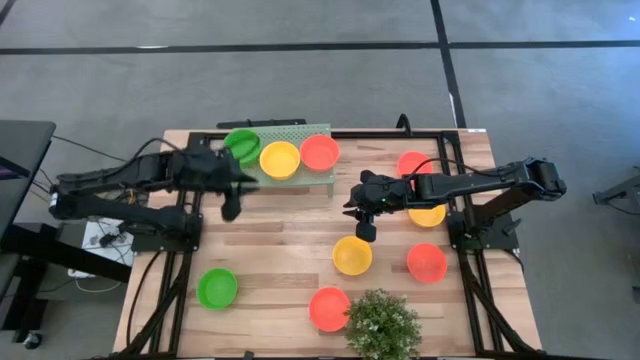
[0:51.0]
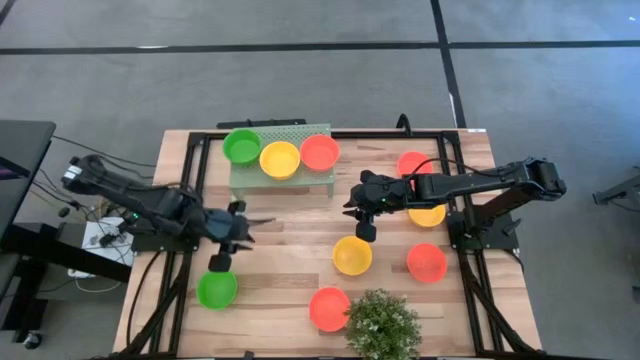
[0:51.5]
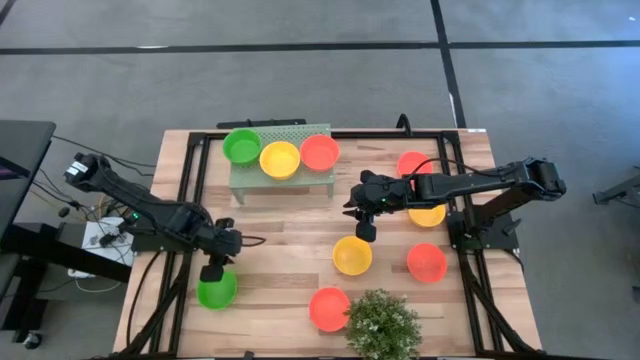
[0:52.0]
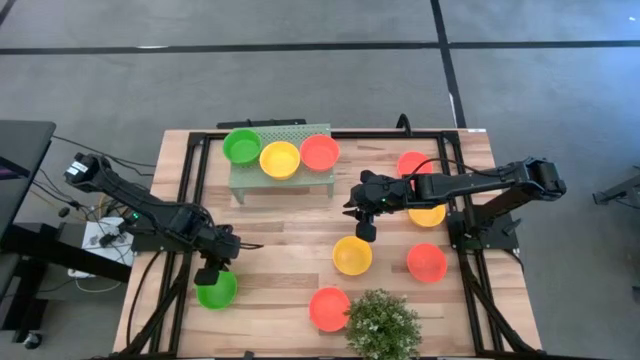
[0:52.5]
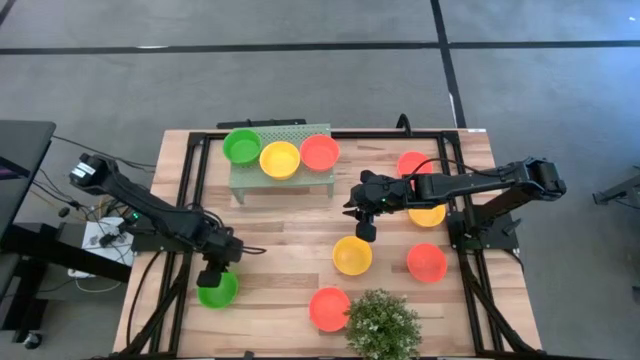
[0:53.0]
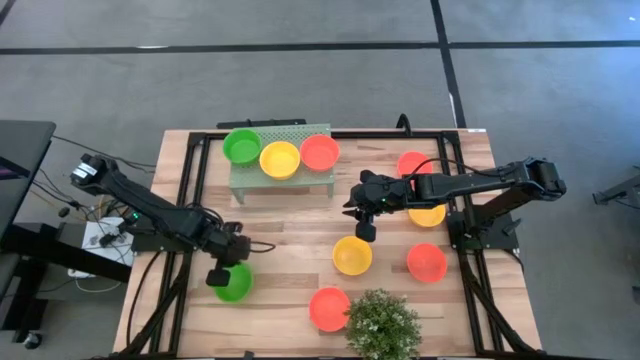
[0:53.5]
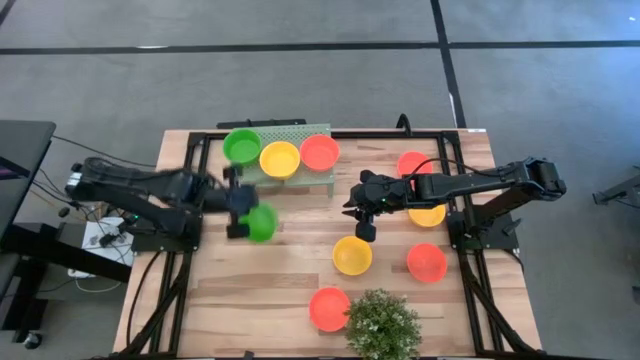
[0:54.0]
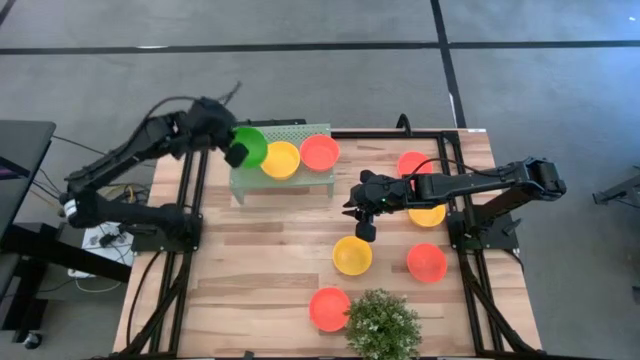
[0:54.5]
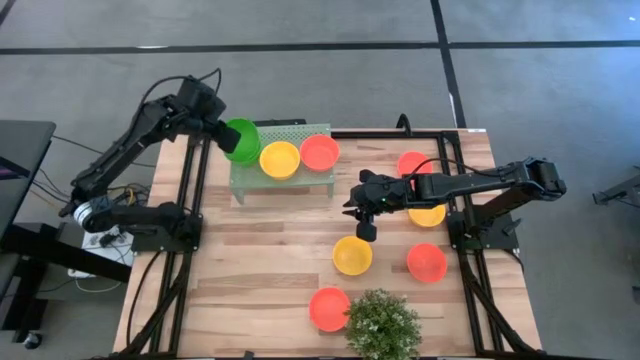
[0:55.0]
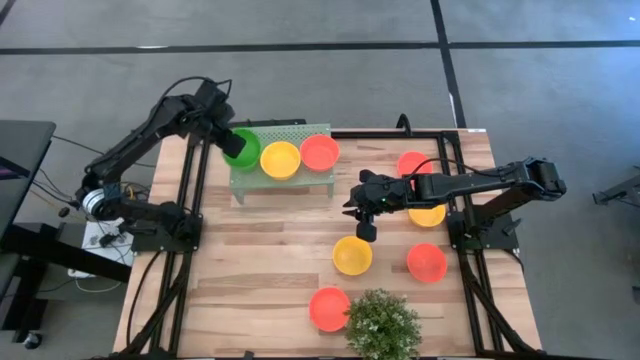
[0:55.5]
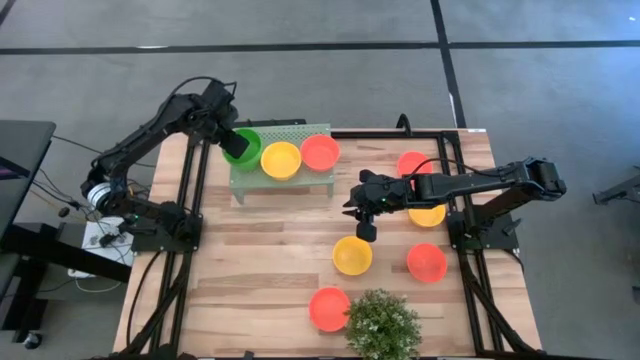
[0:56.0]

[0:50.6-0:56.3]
Task: Pick & Place Mini bowls
Stack the green bowl on top of the green bowls on the shelf

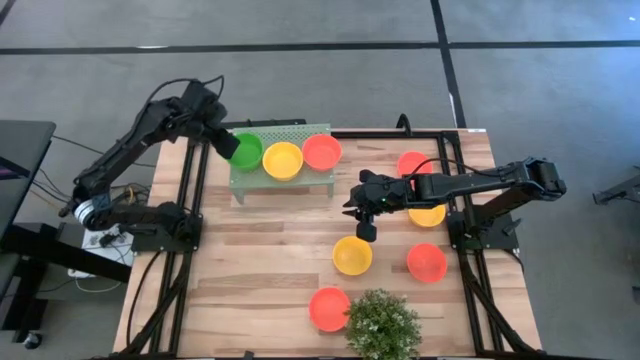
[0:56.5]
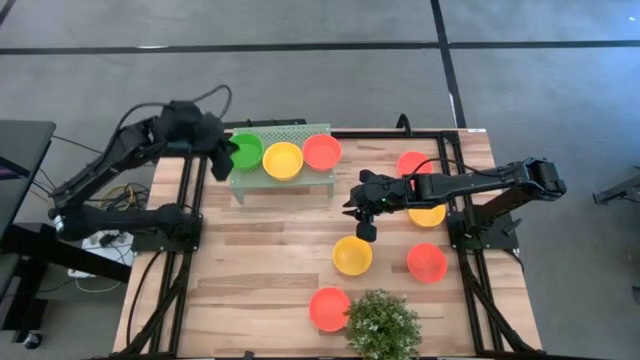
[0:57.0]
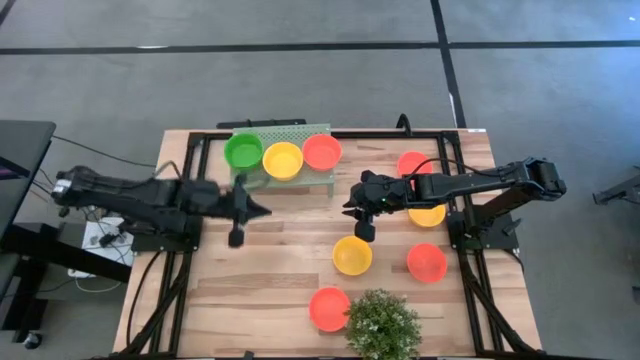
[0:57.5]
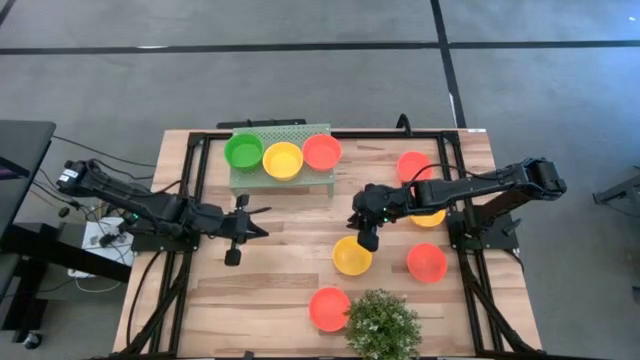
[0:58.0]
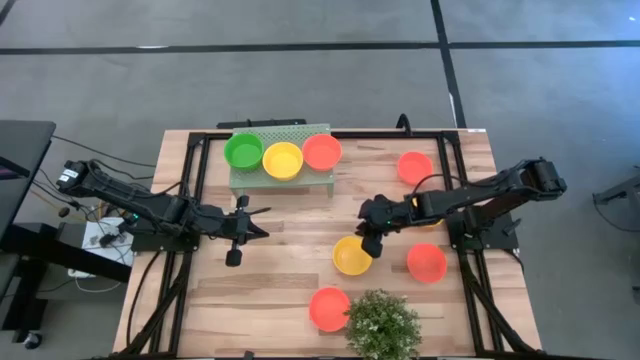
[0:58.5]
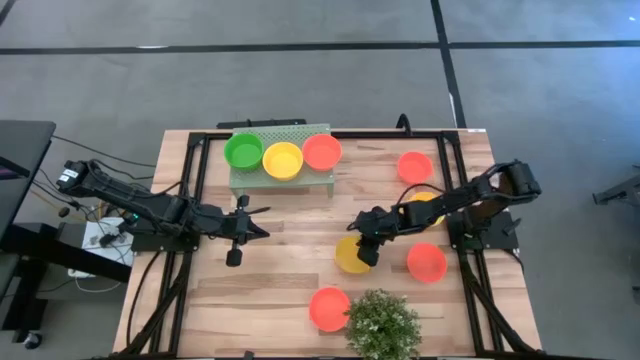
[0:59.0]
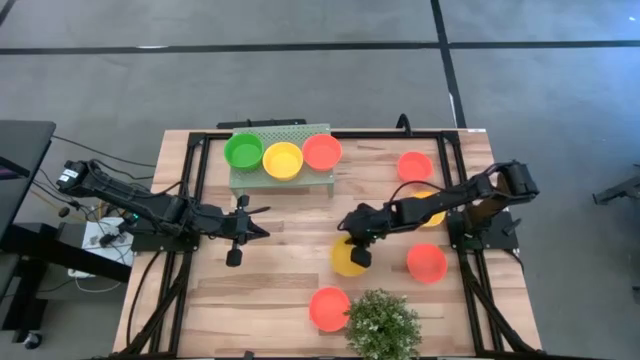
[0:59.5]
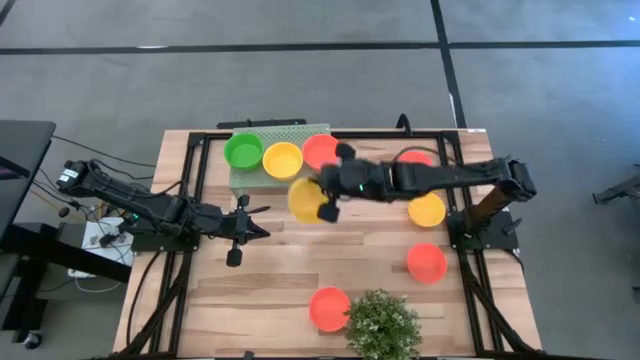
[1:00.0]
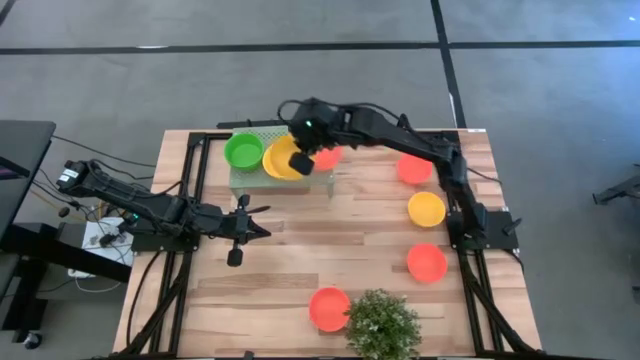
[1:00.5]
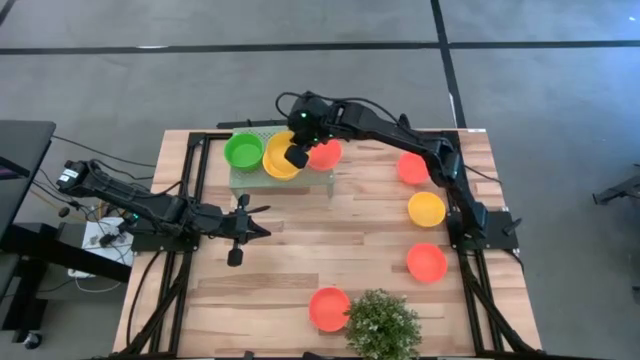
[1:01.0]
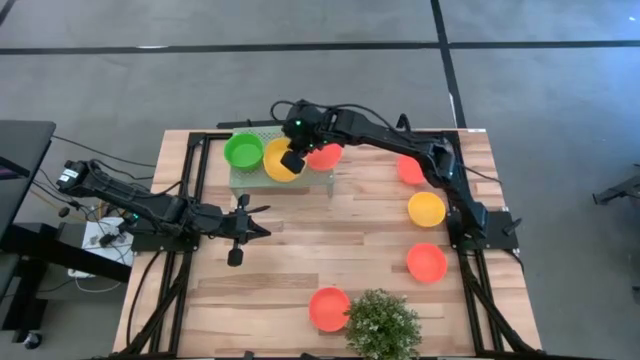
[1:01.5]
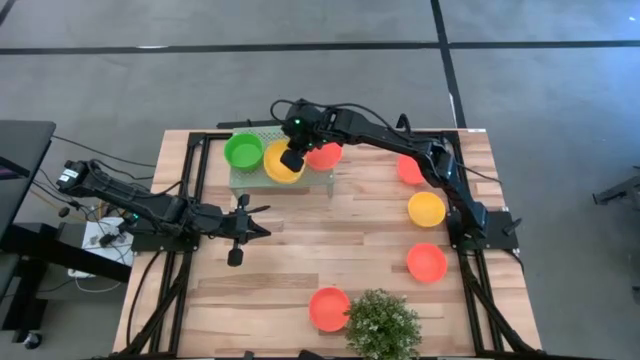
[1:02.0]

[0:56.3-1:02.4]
Stack the yellow bowl on top of the yellow bowl on the shelf

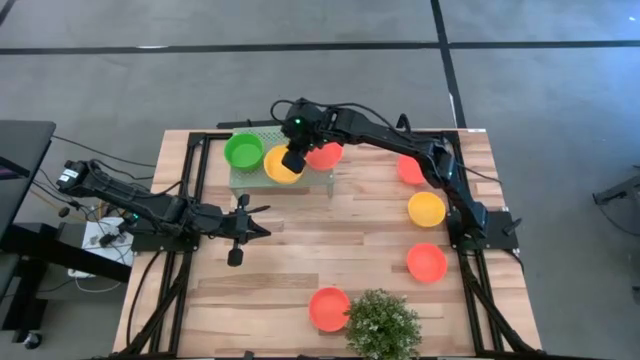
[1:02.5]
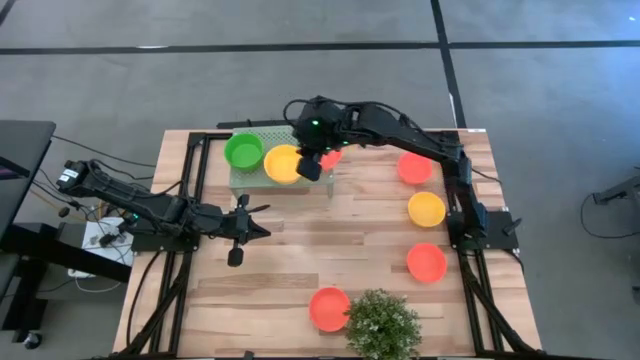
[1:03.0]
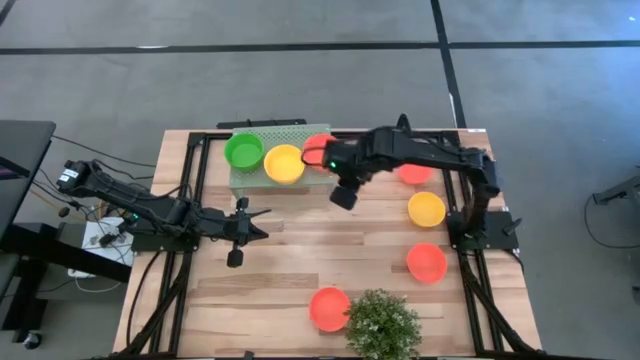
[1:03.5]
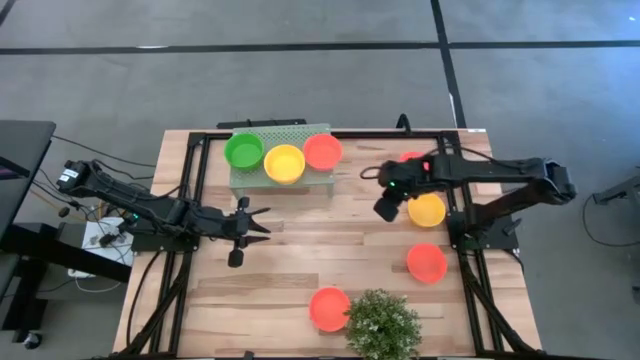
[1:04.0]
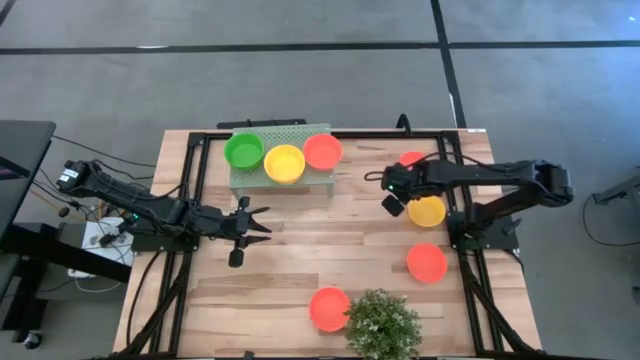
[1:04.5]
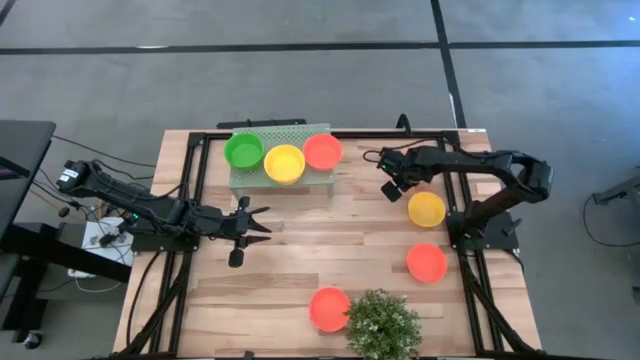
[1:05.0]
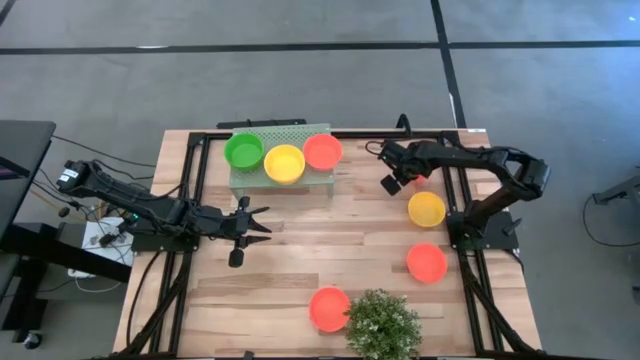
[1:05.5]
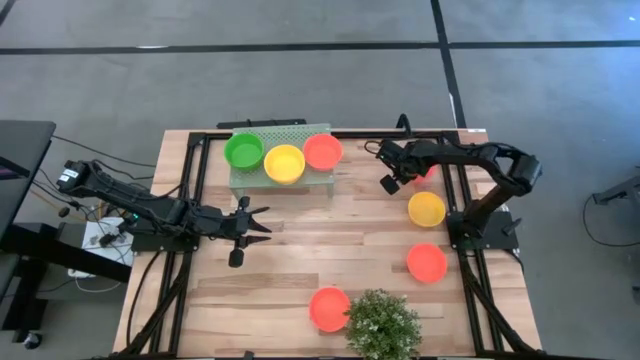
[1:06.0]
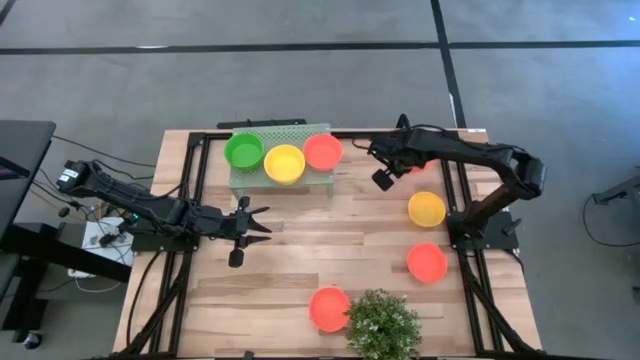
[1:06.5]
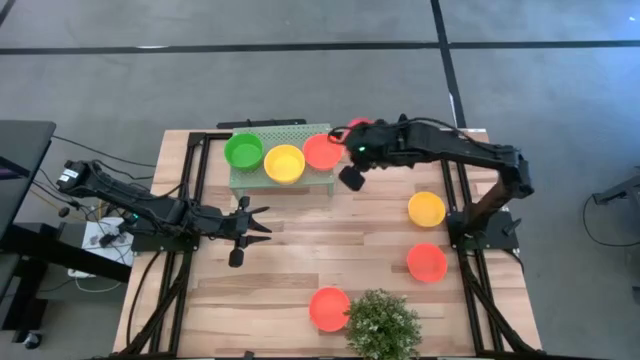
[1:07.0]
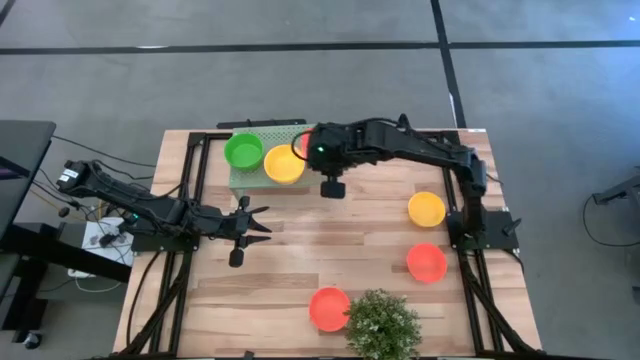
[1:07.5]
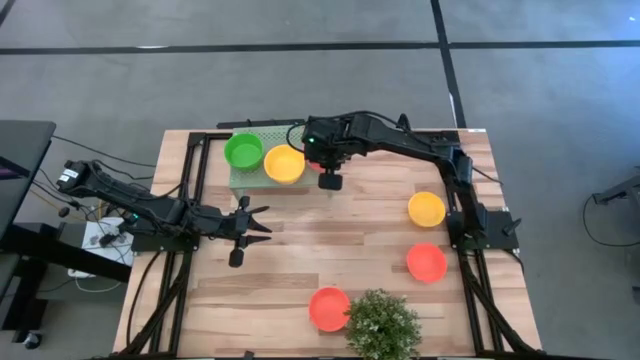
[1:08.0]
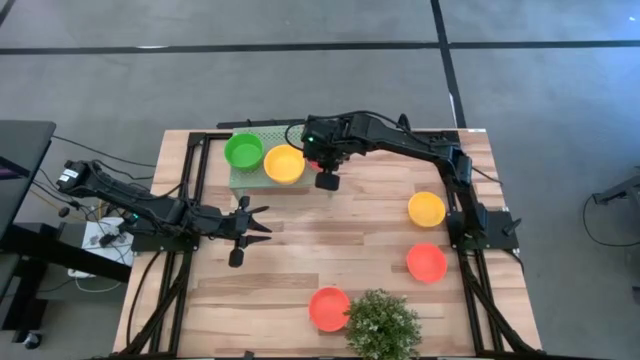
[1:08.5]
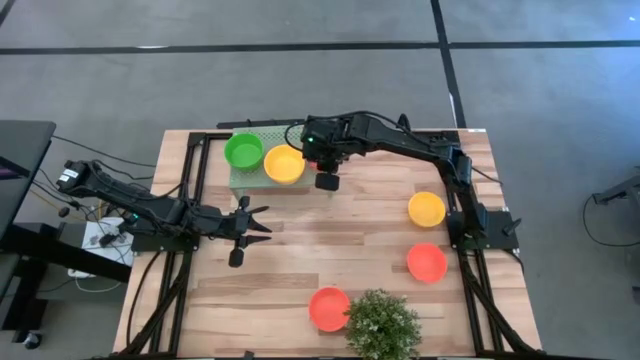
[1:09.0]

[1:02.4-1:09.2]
Stack the orange bowl on top of the orange bowl on the shelf

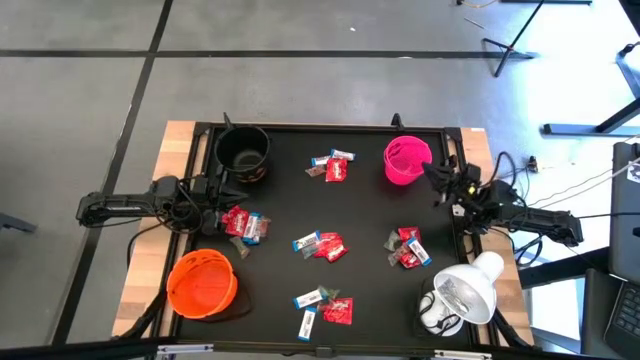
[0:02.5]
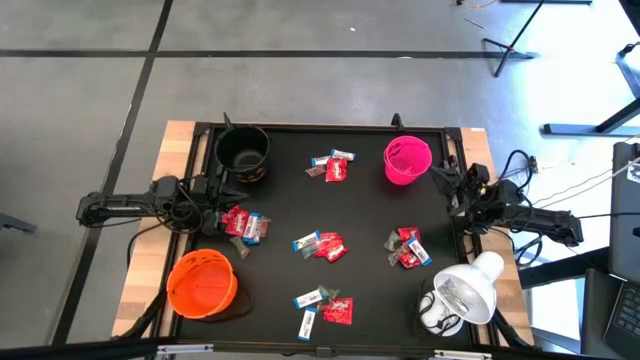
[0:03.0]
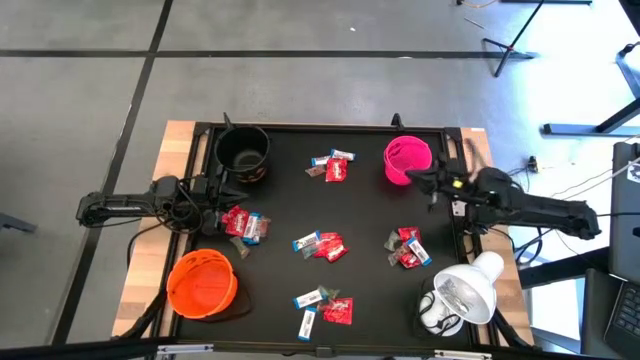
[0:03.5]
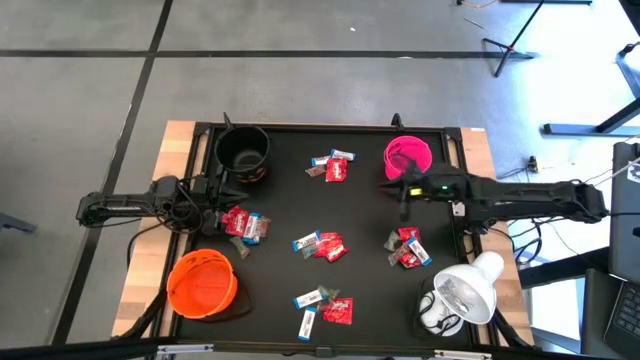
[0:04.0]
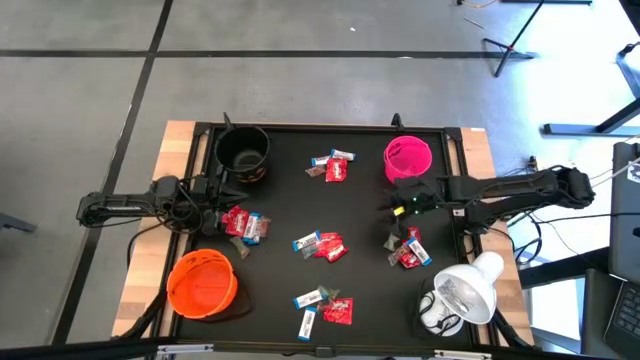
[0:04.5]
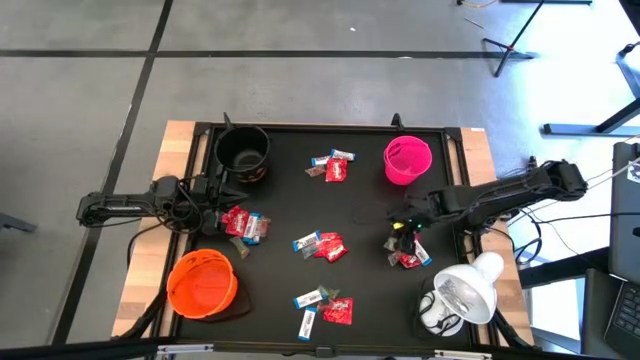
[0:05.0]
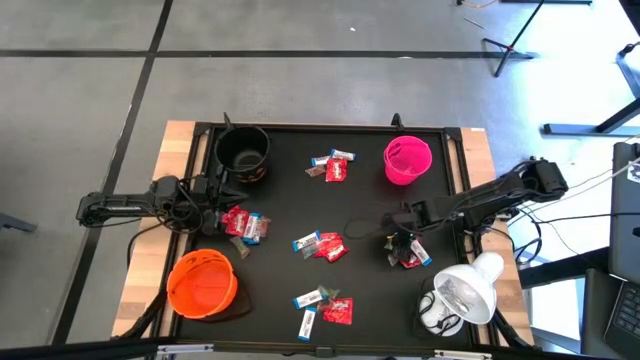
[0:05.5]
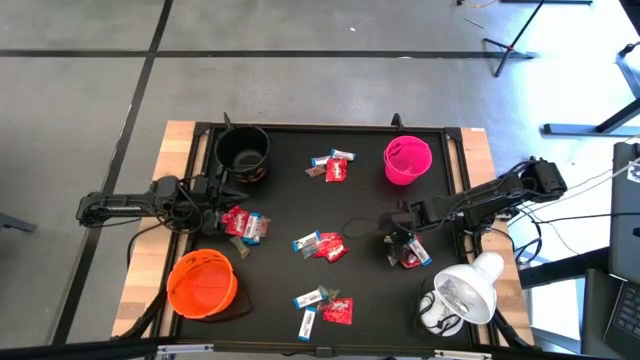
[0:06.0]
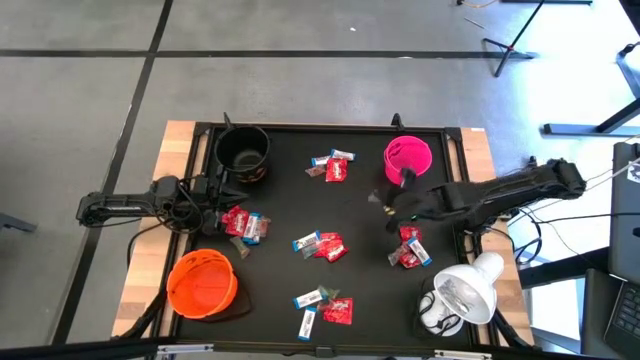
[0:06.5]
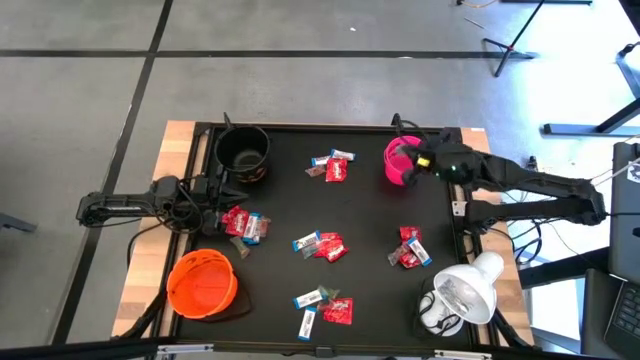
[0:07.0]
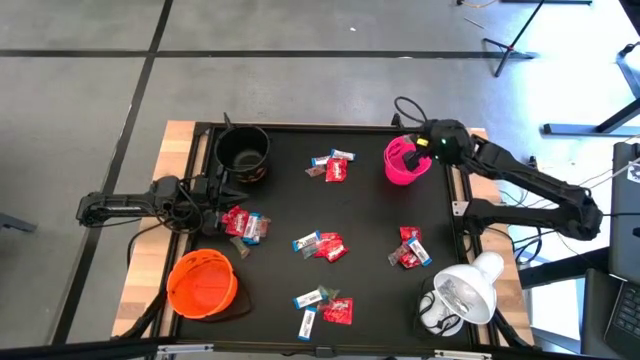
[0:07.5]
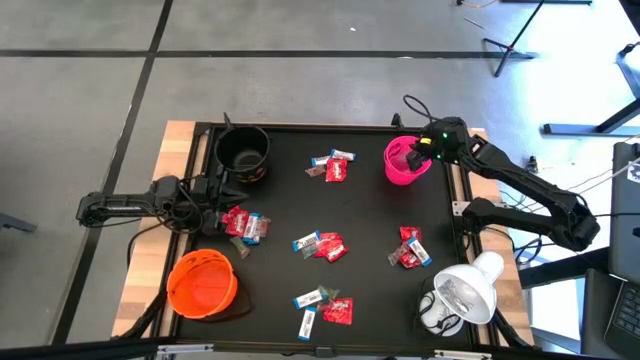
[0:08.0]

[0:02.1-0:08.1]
Task: Sort candy
Put the green gummy into the pink bucket
